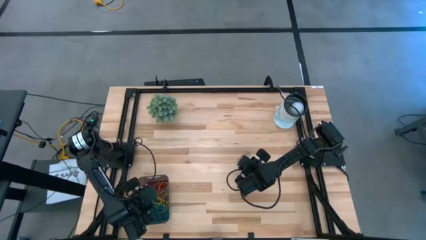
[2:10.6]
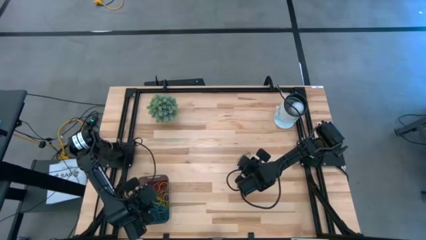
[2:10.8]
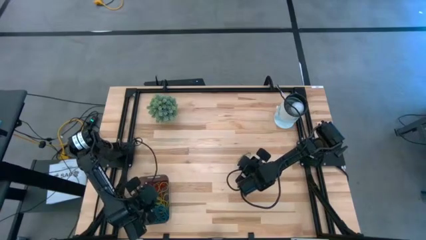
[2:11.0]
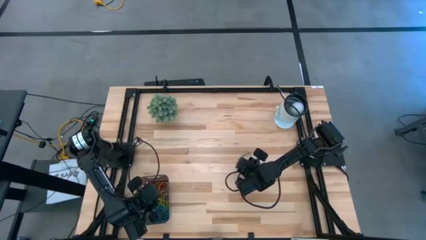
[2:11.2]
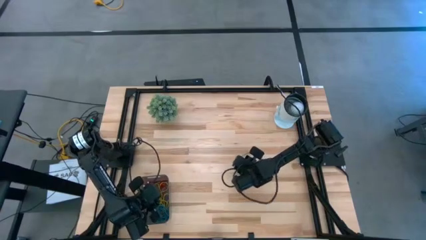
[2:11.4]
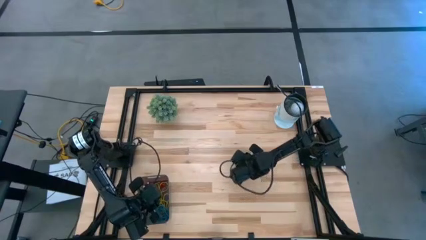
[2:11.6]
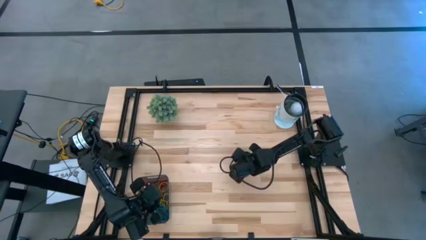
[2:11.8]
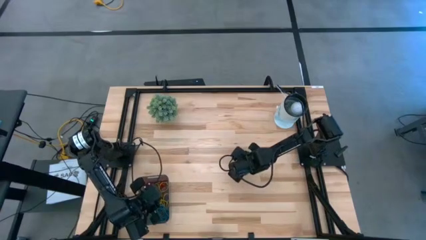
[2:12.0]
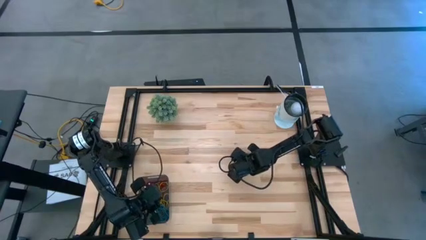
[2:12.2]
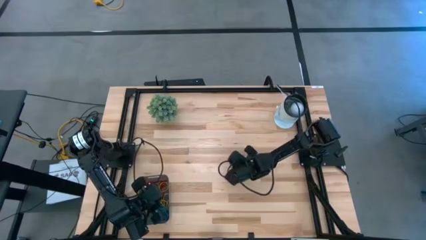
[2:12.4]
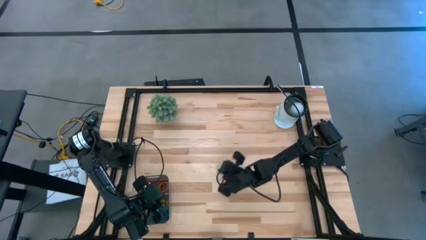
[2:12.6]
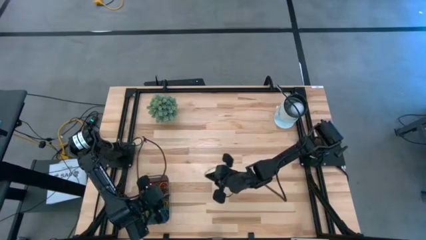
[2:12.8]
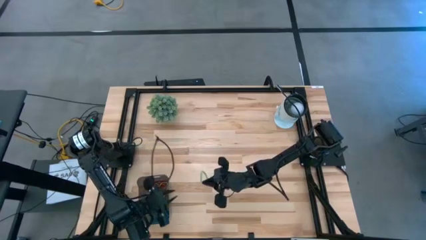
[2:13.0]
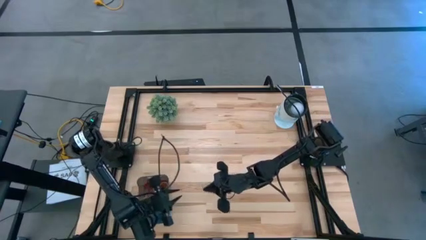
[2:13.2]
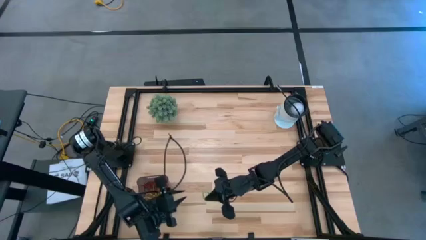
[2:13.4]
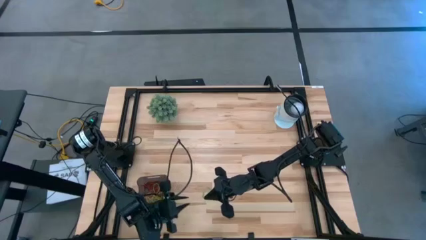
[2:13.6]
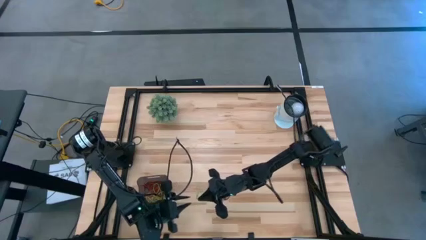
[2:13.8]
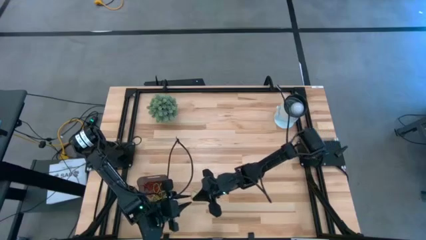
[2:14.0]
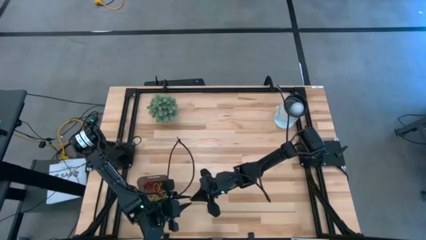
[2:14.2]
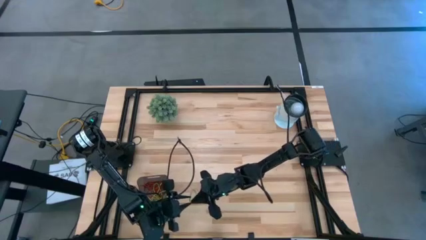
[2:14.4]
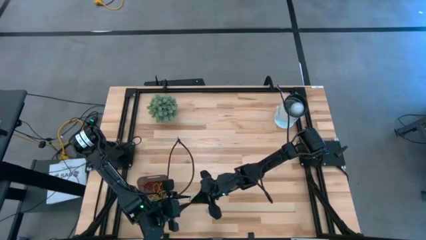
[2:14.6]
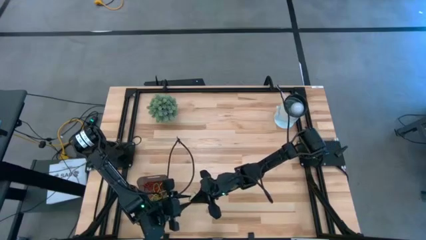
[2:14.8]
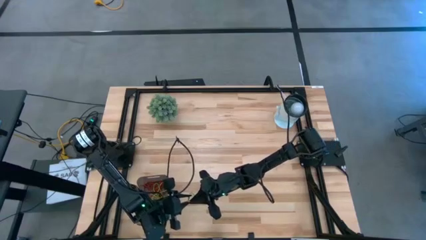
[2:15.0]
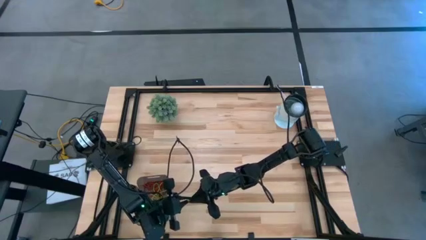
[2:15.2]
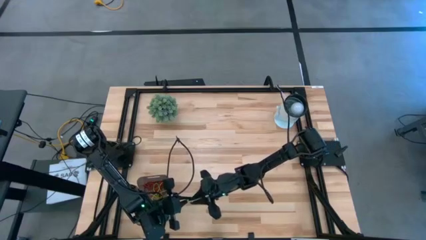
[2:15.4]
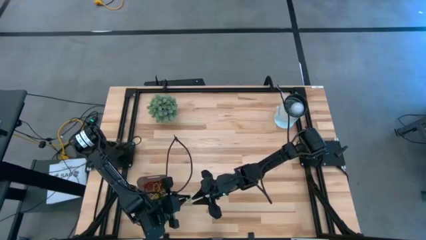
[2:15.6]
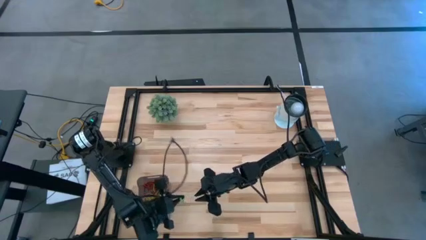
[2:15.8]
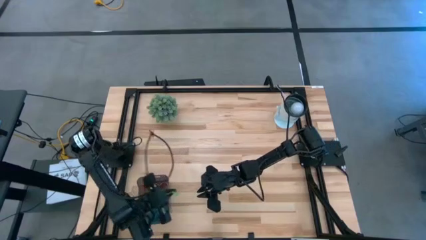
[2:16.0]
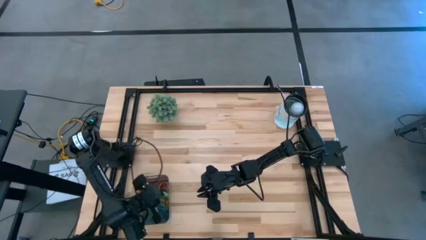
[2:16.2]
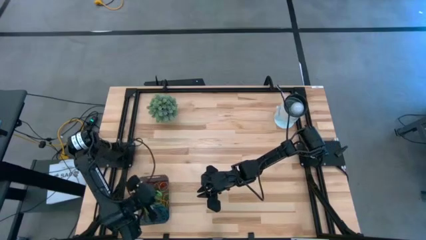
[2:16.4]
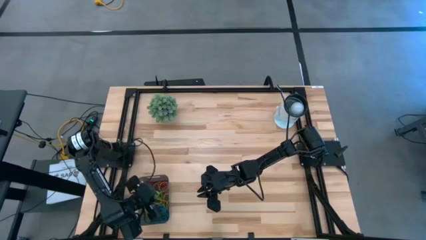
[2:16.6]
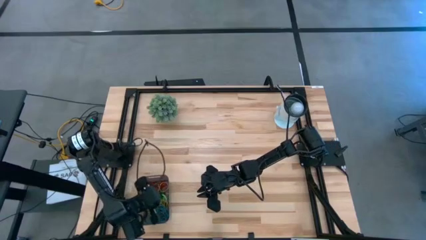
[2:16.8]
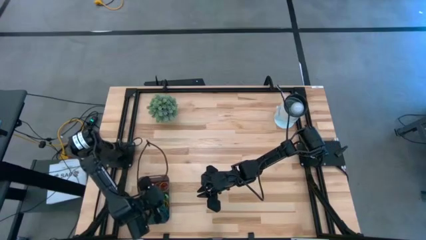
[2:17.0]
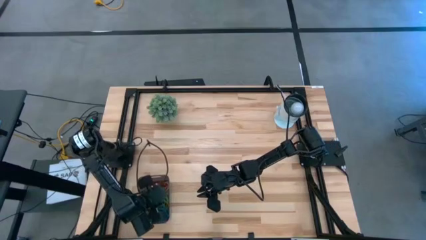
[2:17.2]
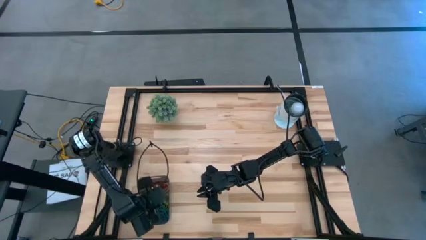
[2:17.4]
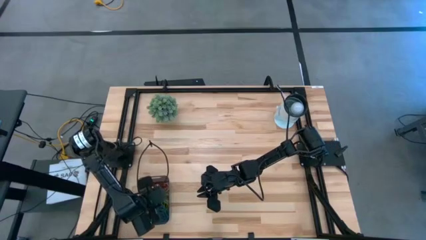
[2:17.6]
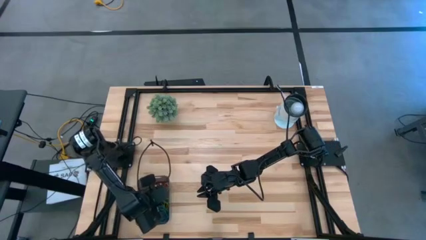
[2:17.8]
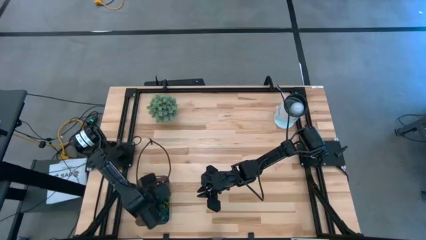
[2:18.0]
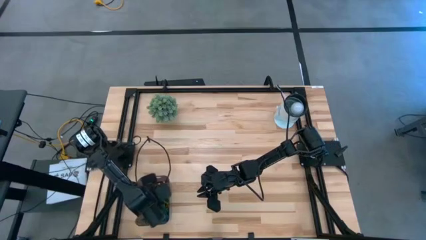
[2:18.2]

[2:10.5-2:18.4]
Task: Pick and place items into bin
Put the green rubber band into the black bin

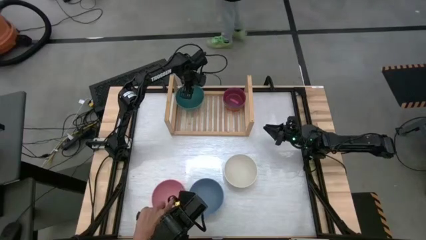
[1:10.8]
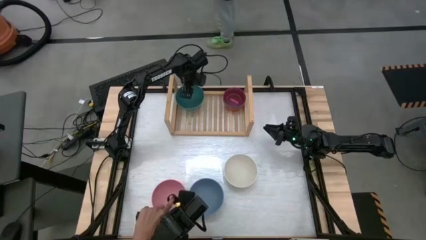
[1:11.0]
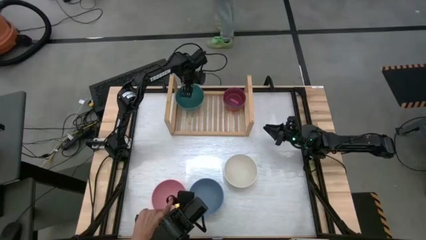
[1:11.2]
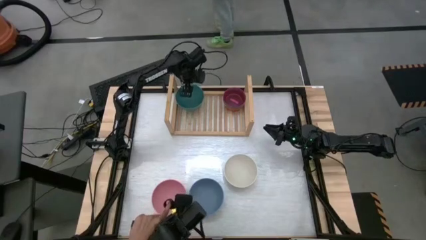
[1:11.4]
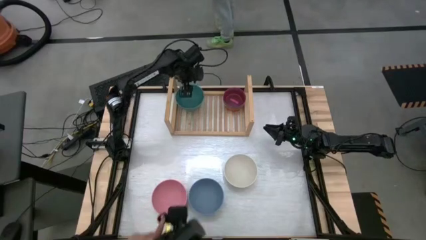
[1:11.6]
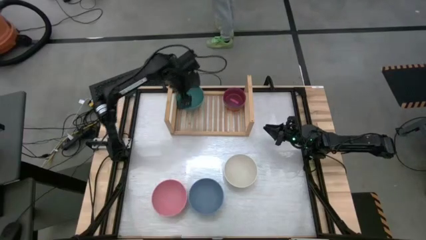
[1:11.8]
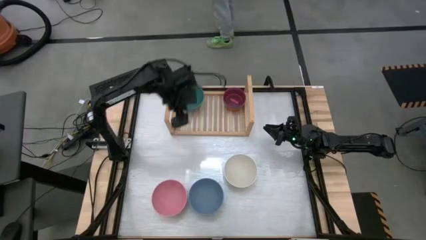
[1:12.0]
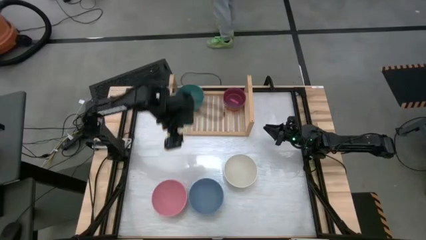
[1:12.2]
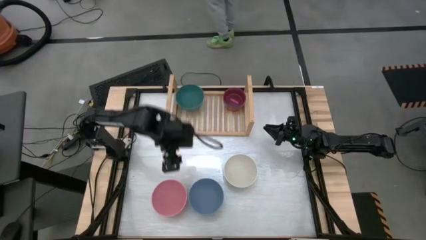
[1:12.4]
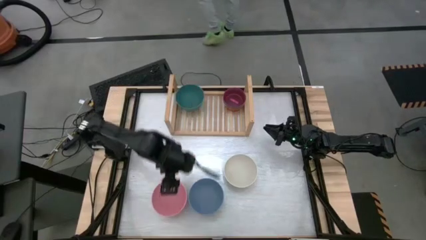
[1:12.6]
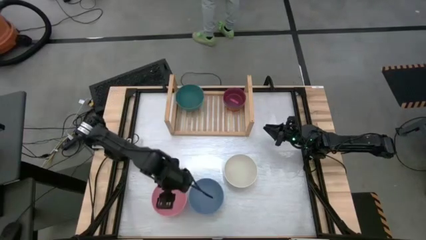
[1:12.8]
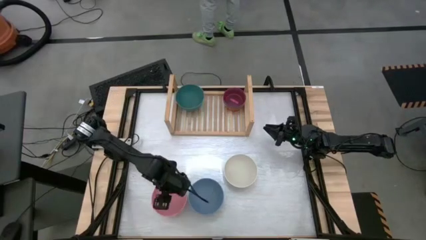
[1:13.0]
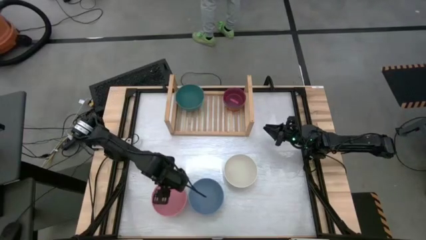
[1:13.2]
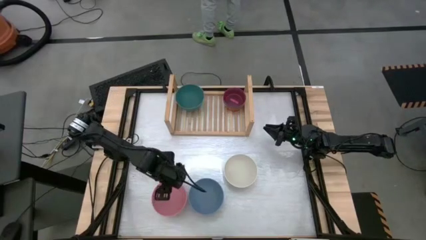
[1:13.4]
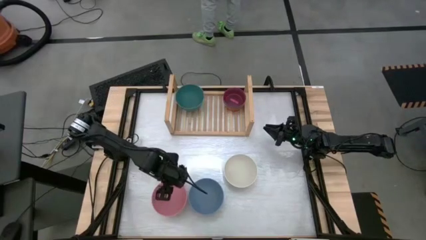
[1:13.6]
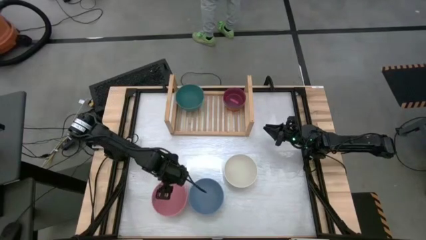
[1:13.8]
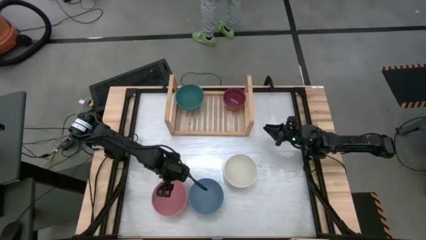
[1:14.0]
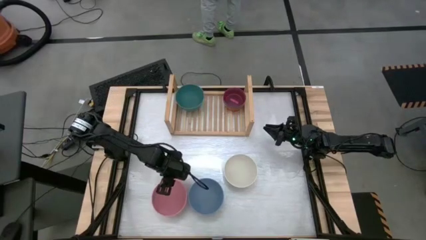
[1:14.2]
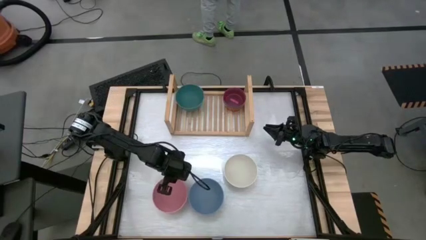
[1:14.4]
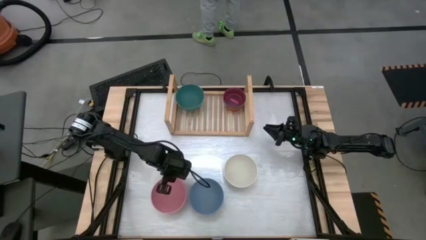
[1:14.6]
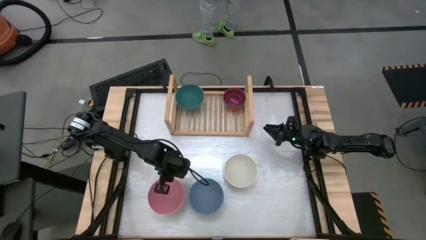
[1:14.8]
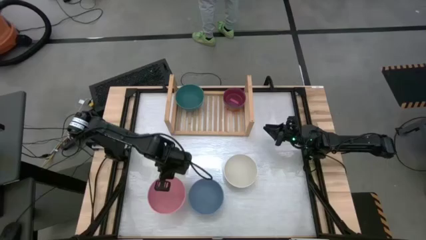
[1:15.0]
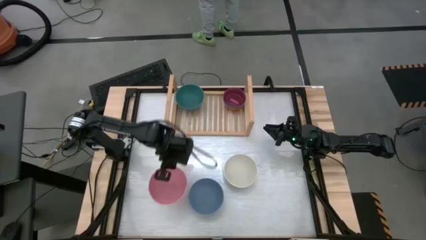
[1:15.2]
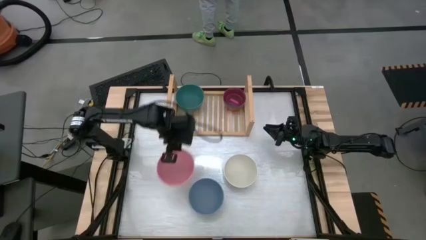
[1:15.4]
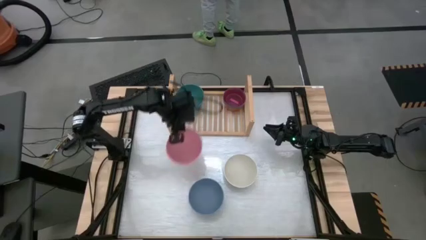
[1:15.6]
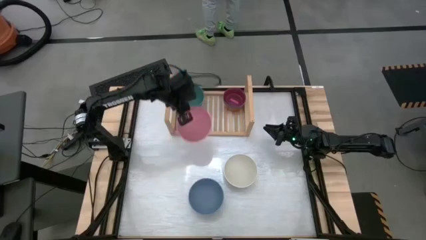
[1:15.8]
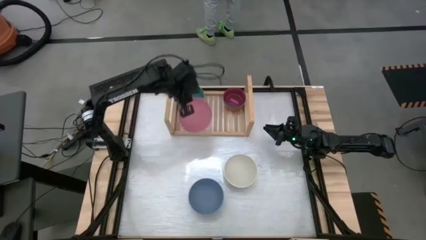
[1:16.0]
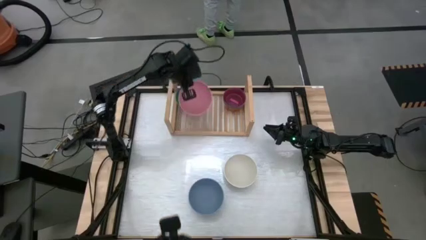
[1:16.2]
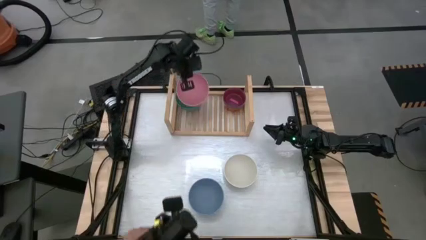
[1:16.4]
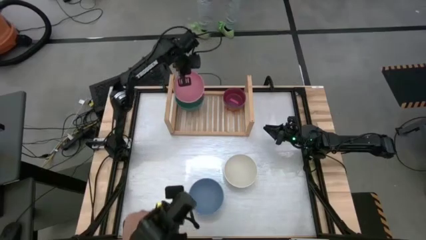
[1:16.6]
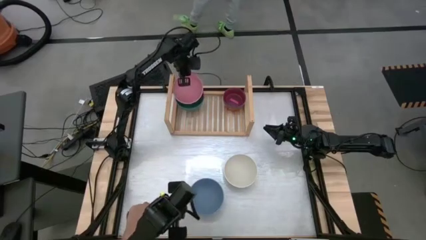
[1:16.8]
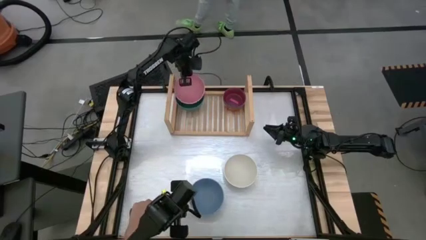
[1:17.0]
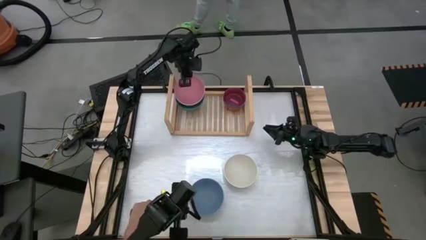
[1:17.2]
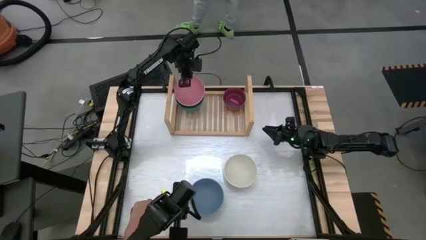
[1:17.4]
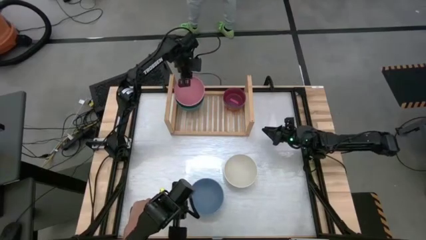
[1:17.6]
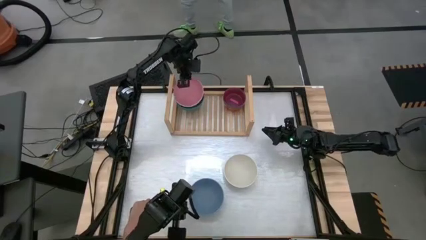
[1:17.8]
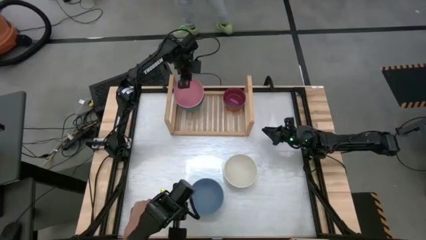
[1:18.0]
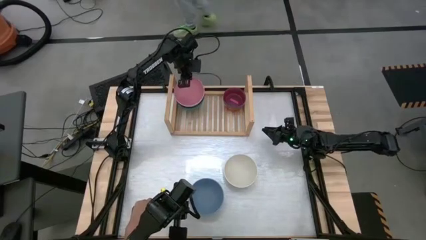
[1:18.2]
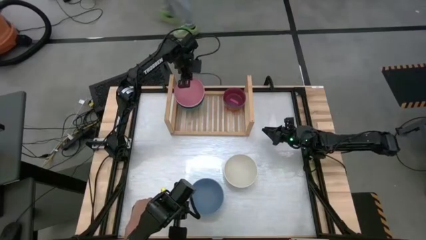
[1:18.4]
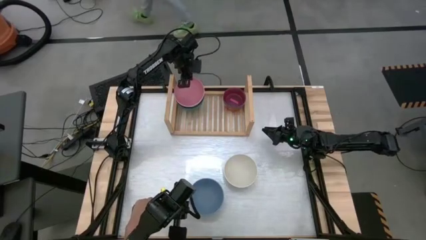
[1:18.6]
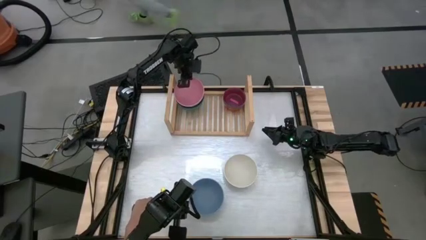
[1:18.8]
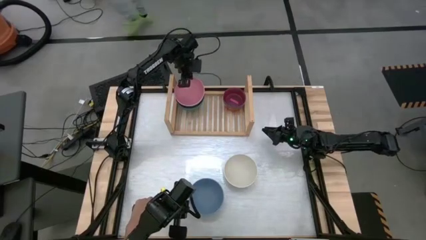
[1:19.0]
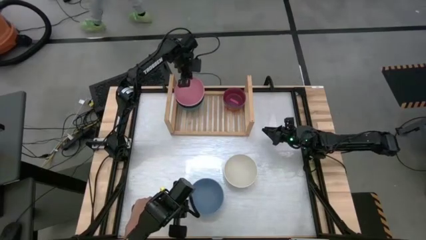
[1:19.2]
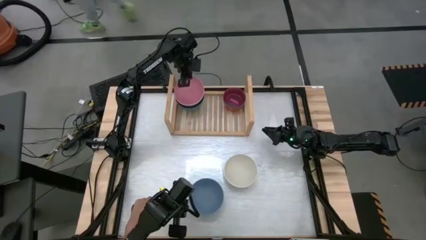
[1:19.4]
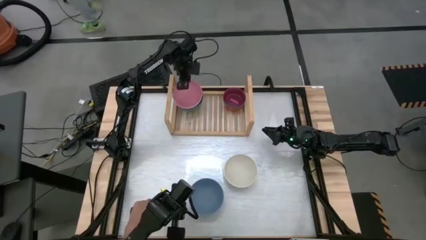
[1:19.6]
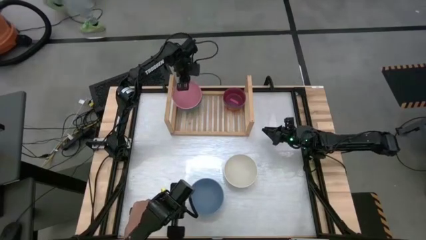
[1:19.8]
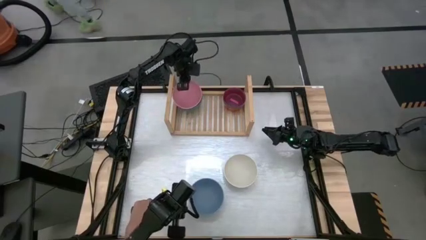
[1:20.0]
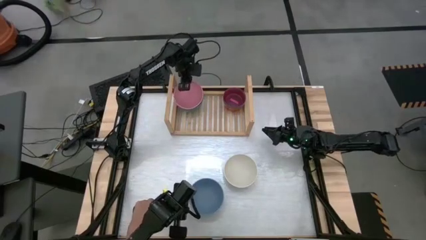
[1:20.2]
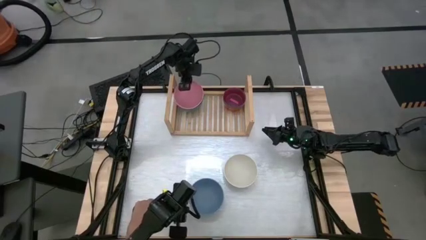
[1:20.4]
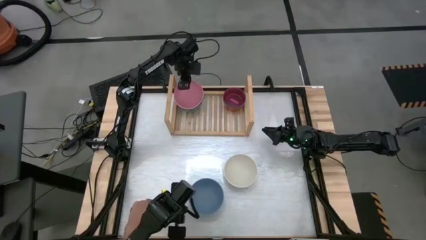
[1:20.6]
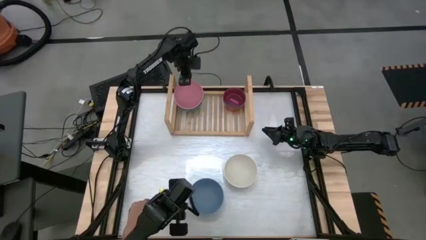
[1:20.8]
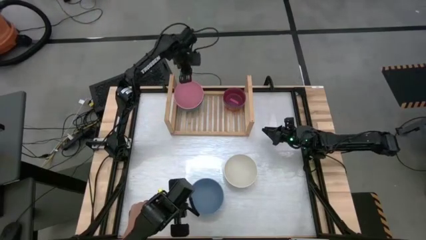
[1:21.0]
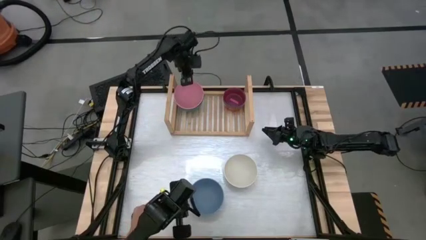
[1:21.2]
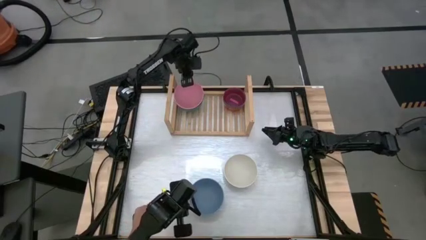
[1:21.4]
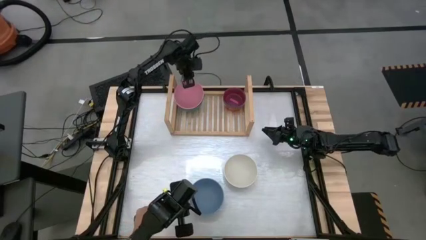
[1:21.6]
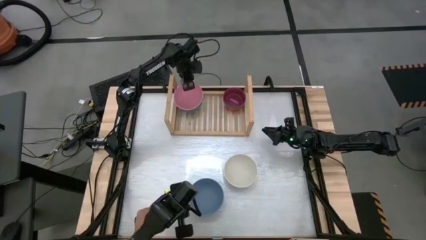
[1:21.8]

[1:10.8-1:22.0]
Task: Place and stack bowls onto a shelf
Stack the large pink bowl on top of the large green bowl on the shelf
